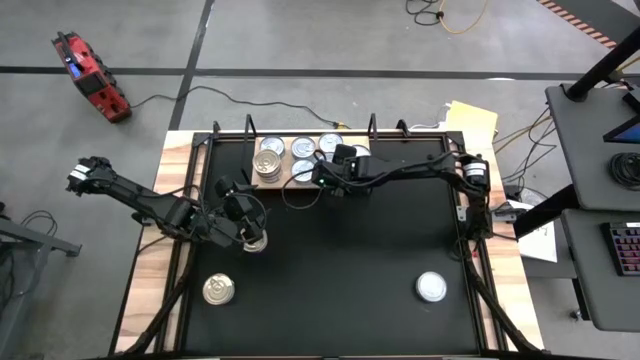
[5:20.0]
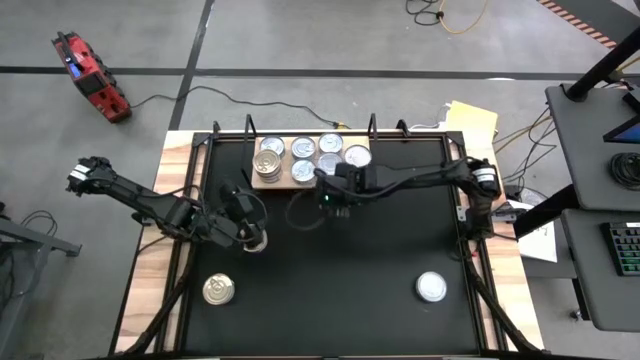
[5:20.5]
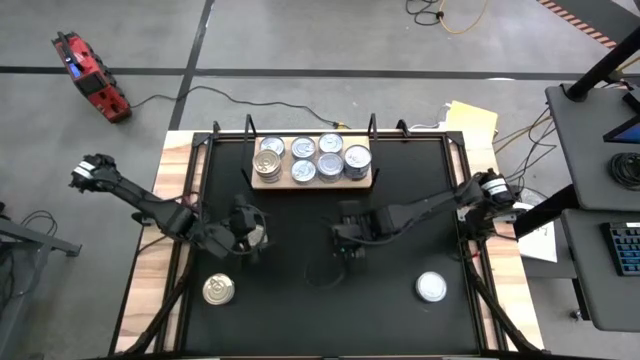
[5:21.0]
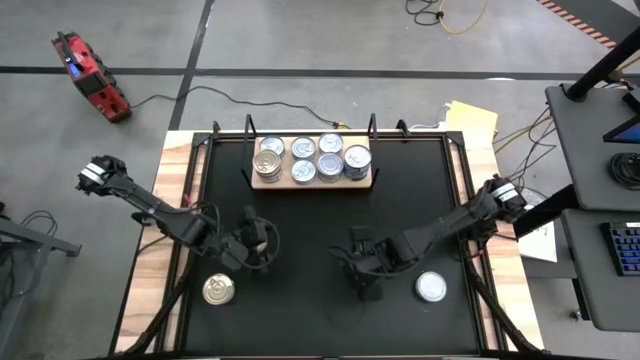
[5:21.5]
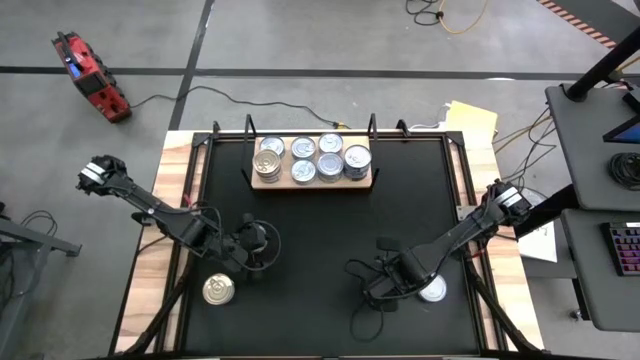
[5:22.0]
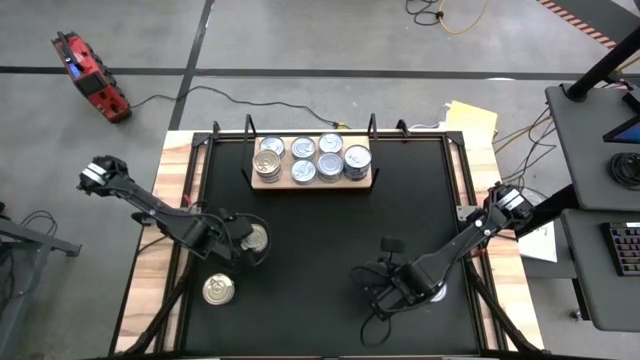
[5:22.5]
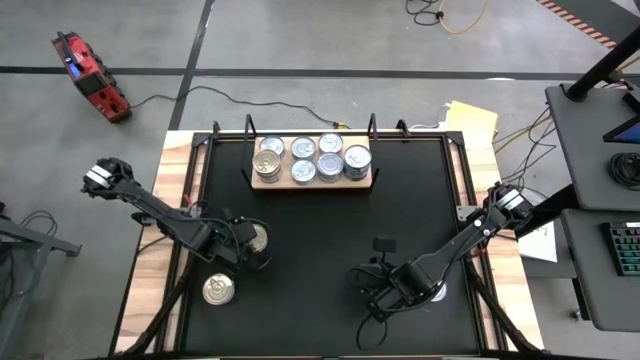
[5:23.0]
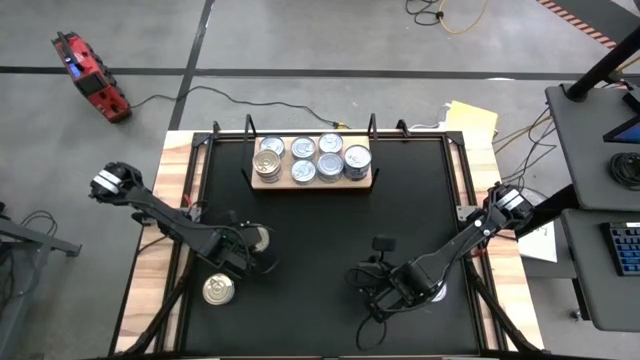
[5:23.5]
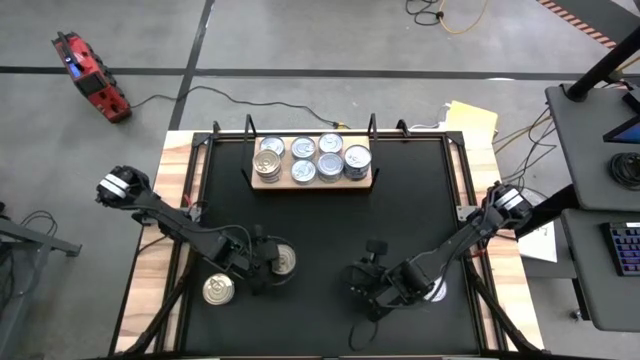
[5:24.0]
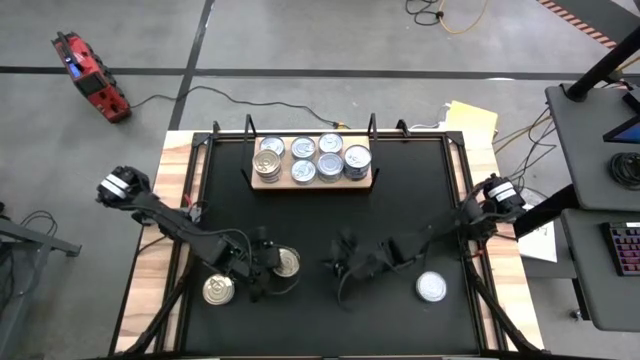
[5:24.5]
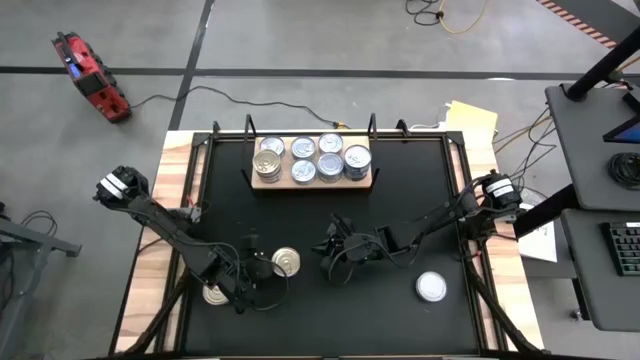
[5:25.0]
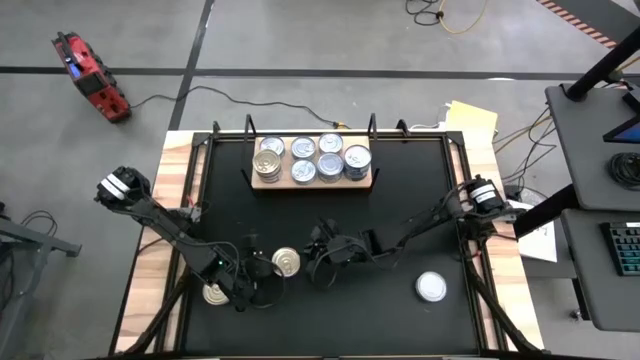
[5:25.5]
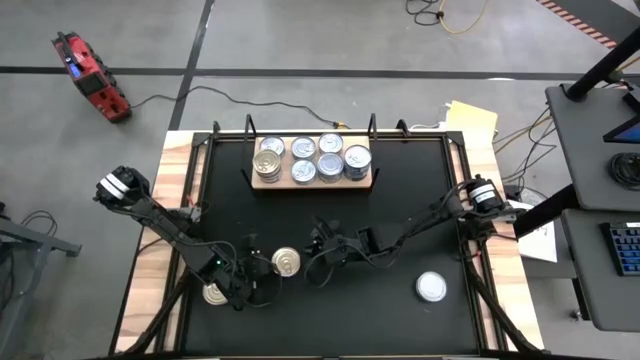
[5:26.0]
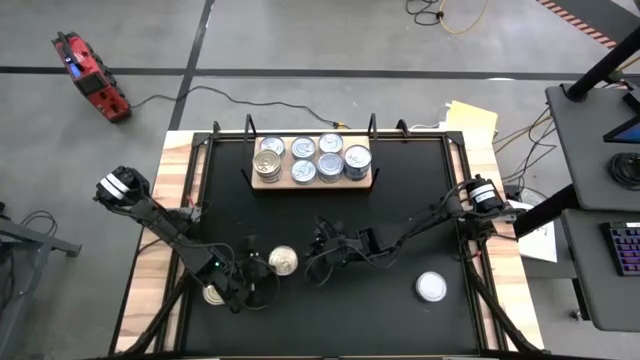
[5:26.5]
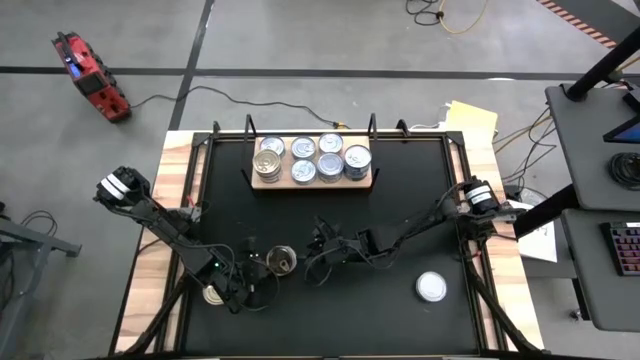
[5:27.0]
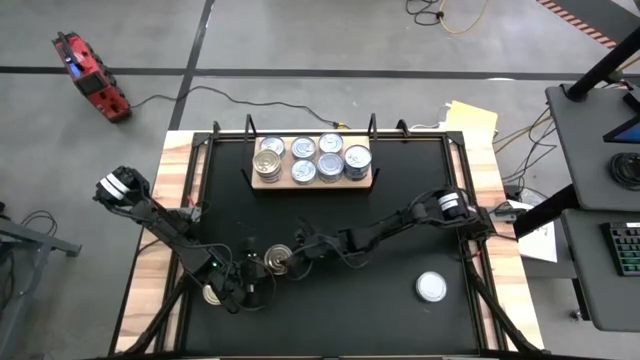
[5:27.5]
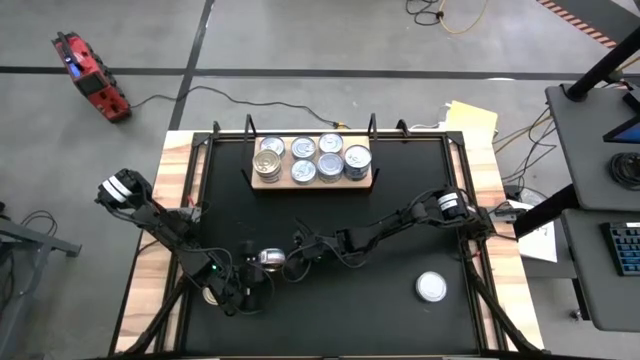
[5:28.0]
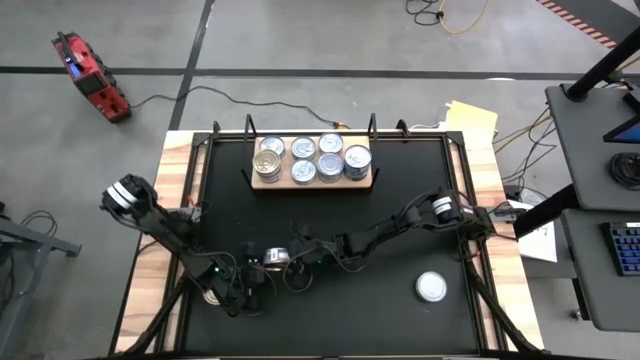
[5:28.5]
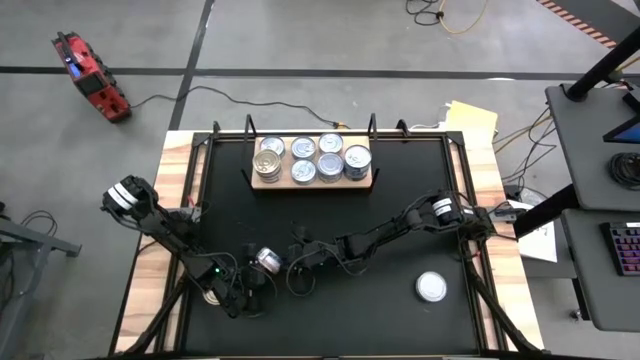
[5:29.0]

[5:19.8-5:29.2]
Task: Stack canned seafood by type on shelf
Stack the blue tuna can on top of the other blue tuna cans on the shelf

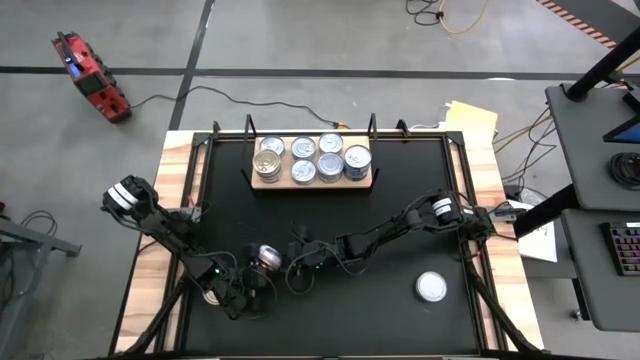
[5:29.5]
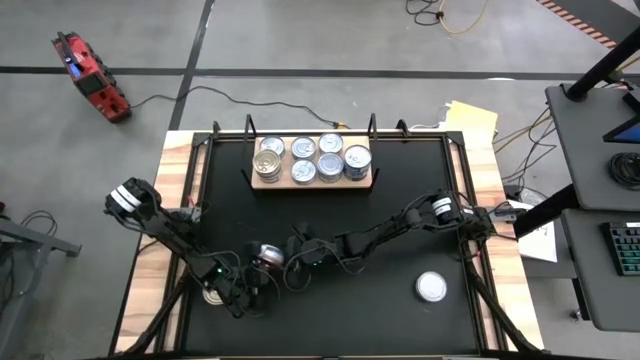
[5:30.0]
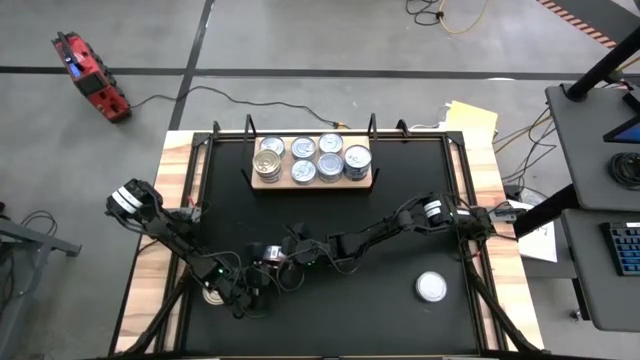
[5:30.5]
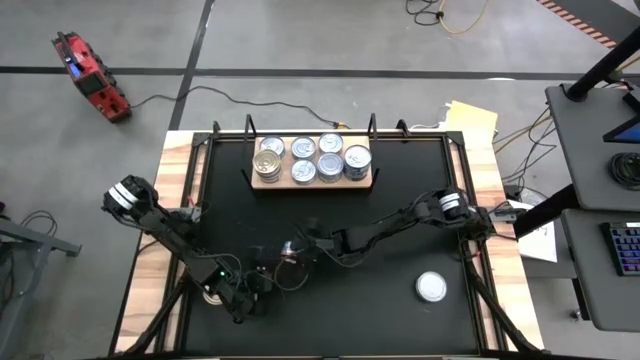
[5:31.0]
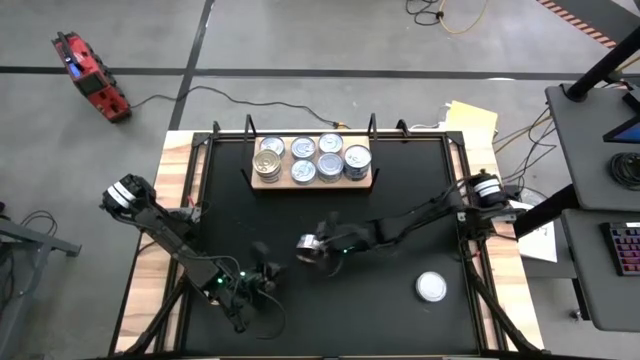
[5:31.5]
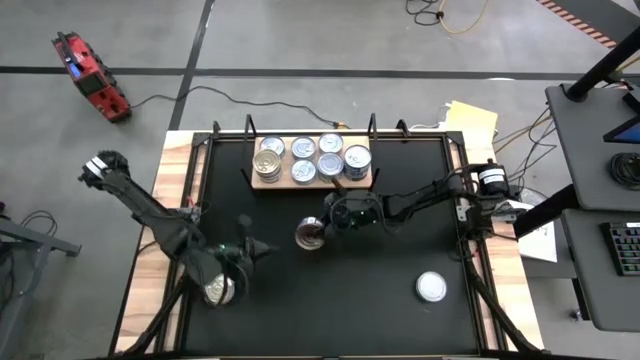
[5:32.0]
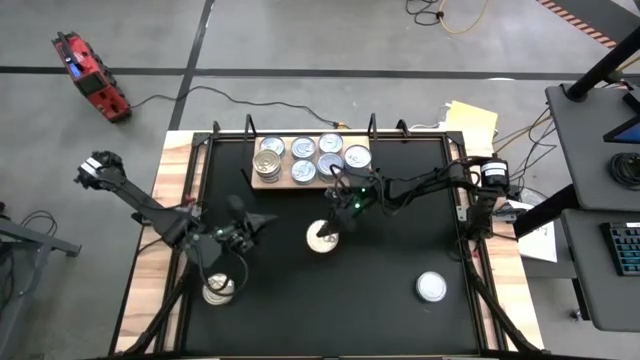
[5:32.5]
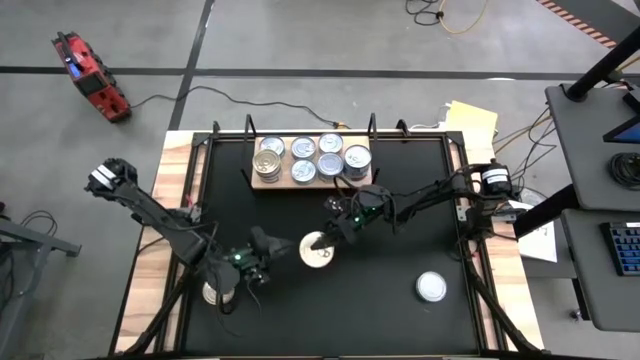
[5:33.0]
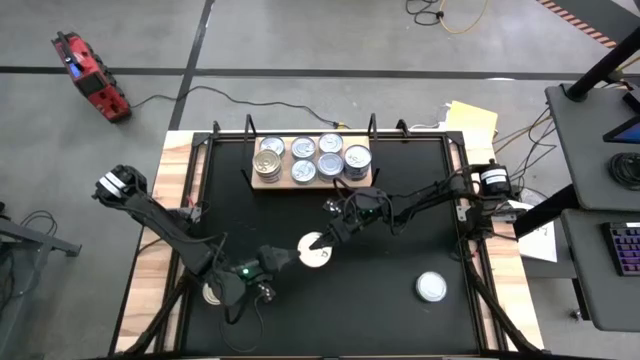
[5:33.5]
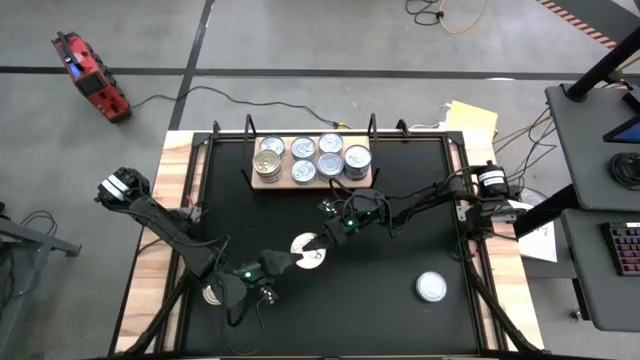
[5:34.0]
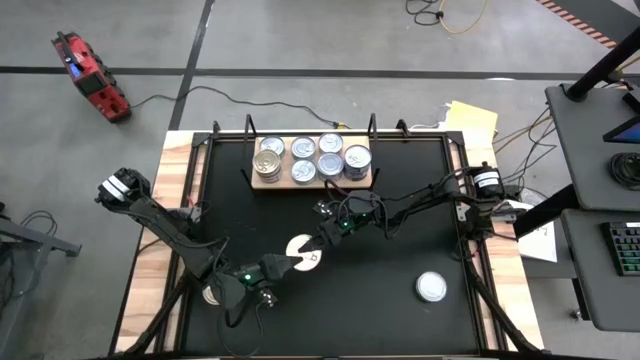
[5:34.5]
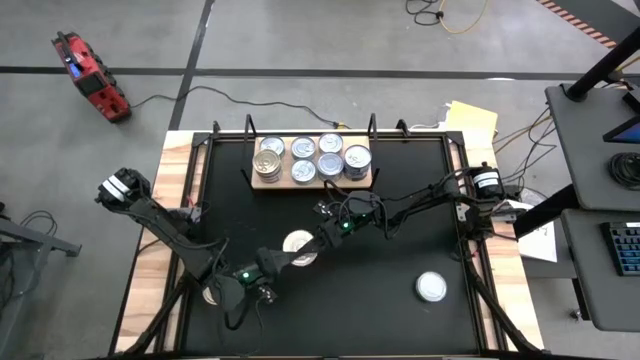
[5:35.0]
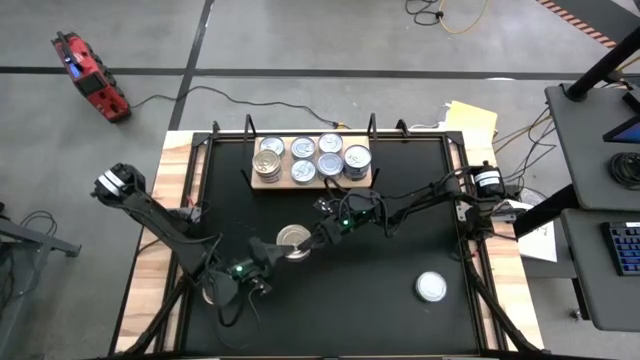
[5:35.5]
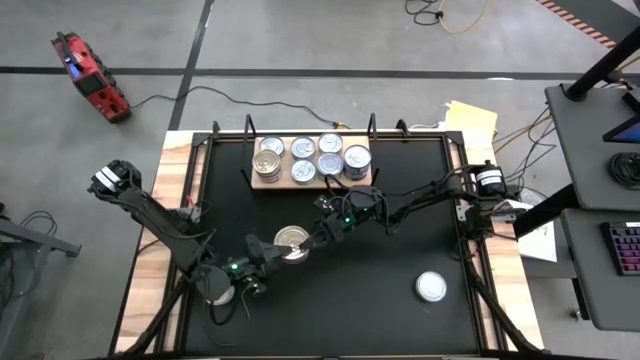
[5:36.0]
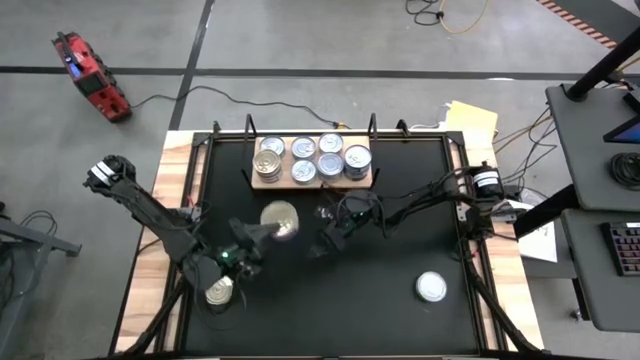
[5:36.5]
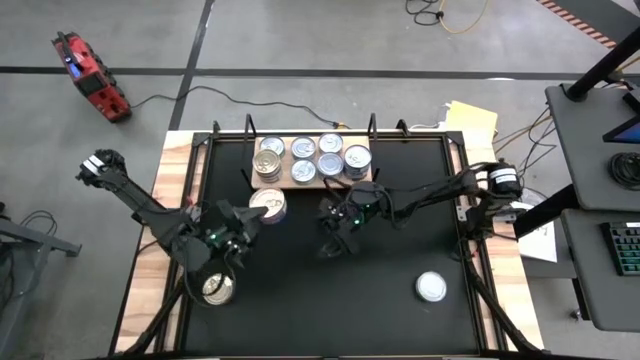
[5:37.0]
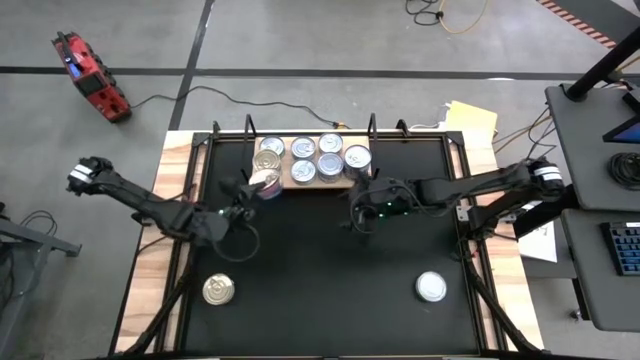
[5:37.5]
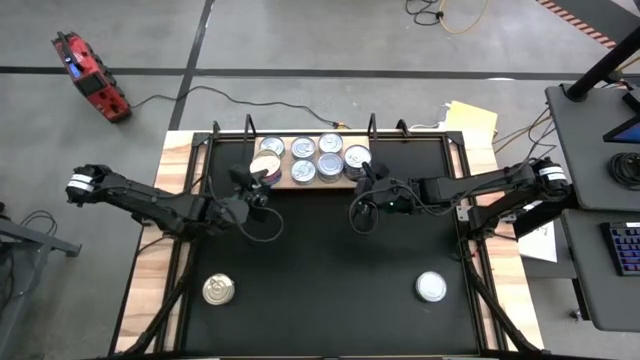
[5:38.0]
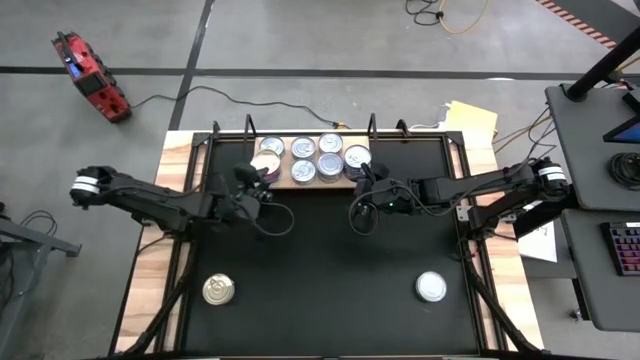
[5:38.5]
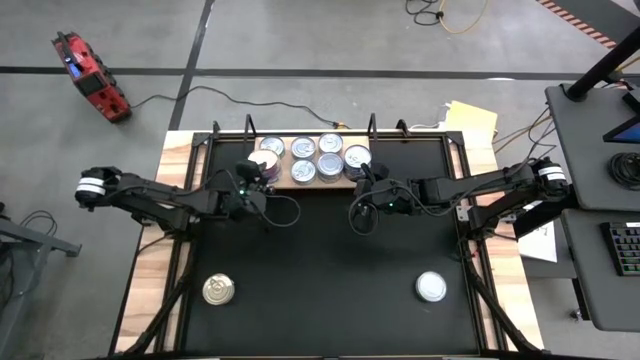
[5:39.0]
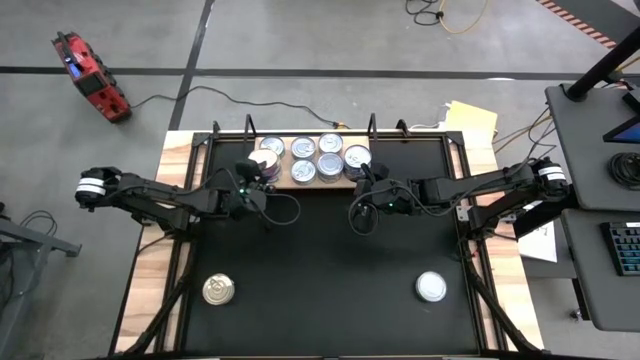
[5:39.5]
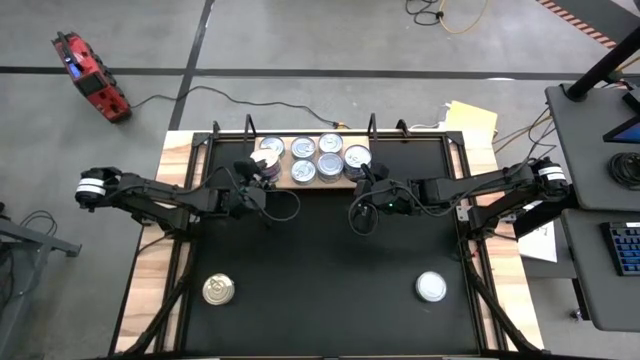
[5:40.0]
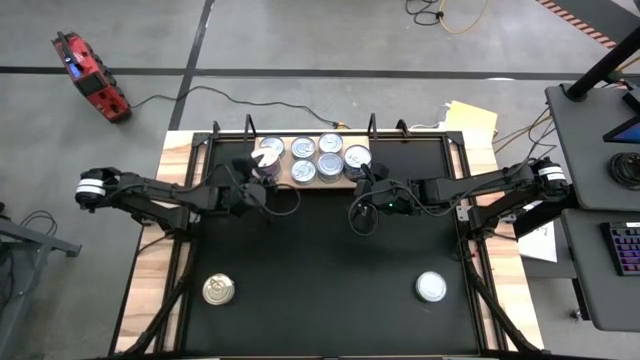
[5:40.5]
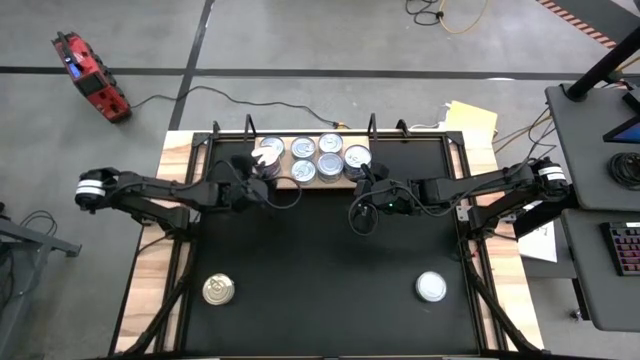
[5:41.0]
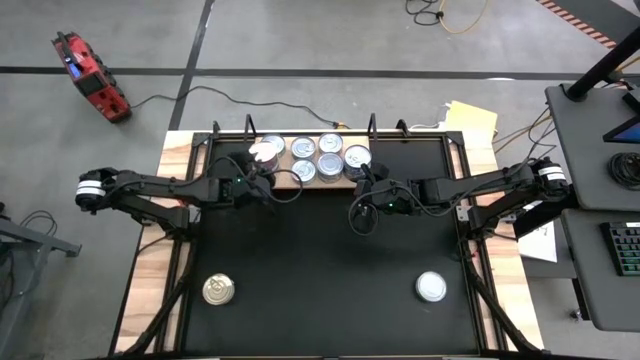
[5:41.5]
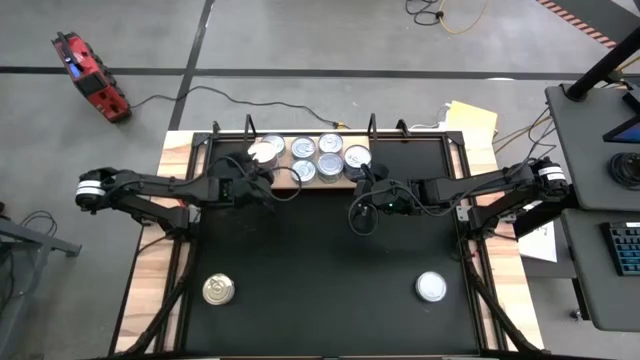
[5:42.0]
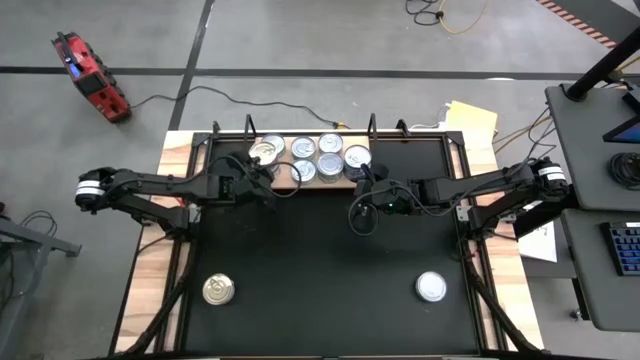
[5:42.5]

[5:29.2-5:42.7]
Stack the blue tuna can on top of the other blue tuna cans on the shelf
